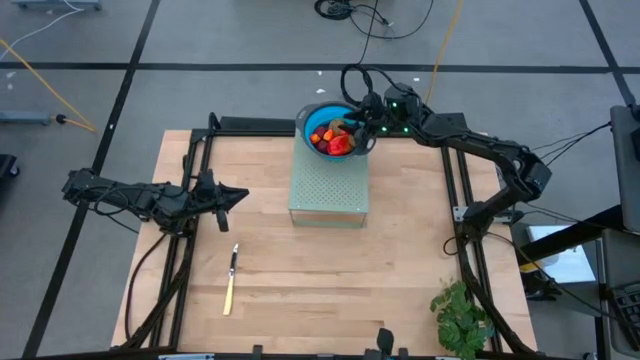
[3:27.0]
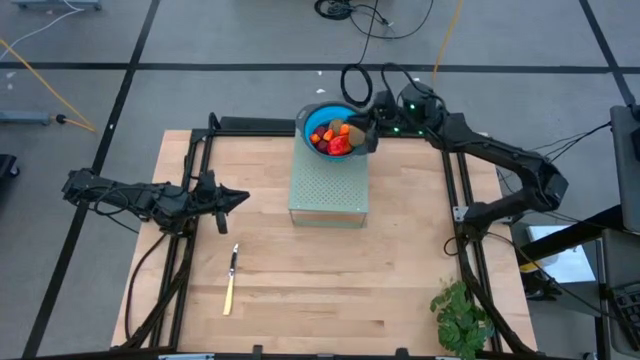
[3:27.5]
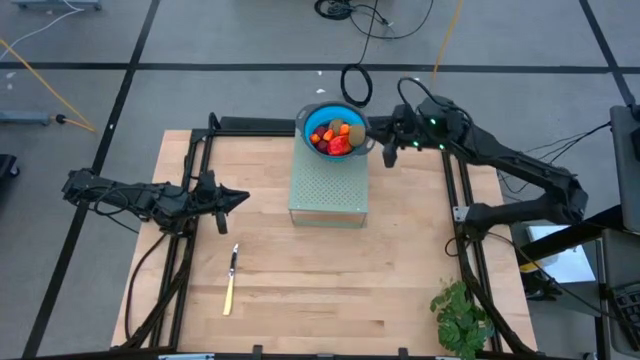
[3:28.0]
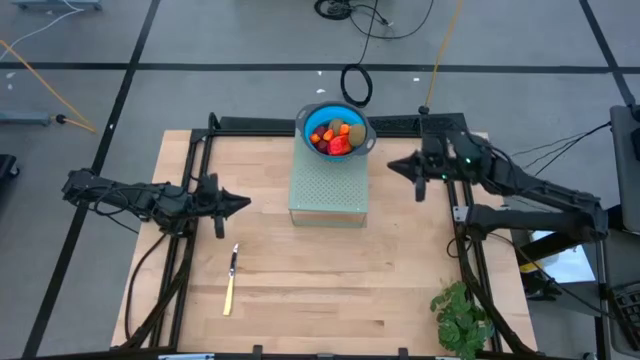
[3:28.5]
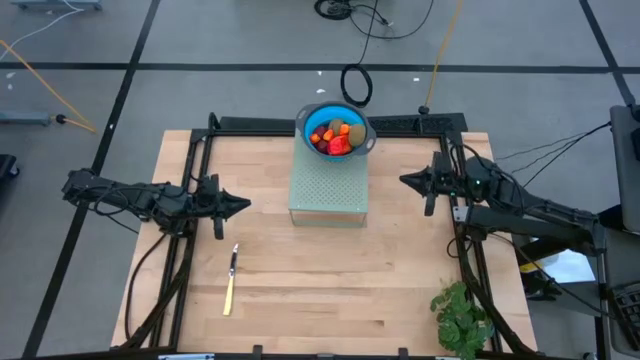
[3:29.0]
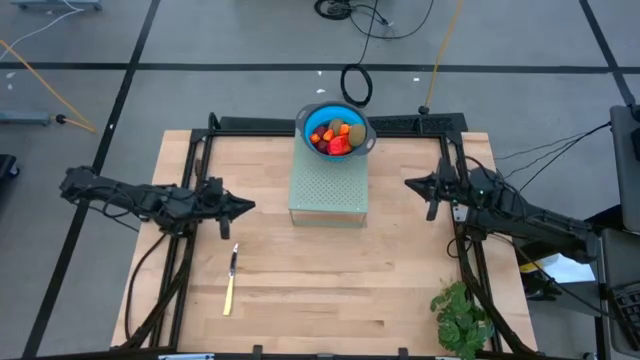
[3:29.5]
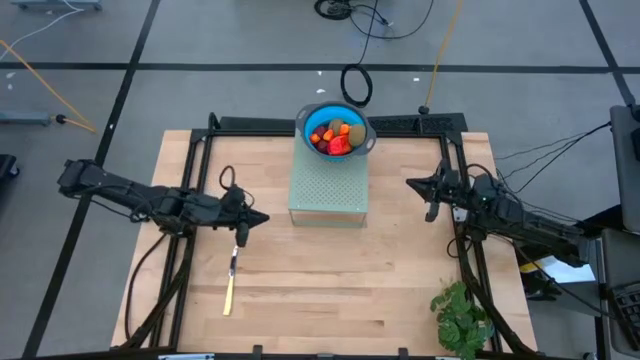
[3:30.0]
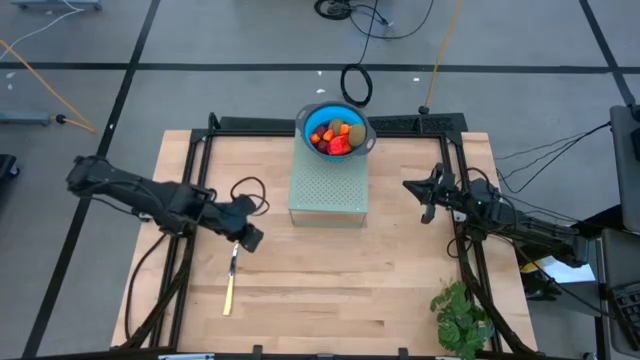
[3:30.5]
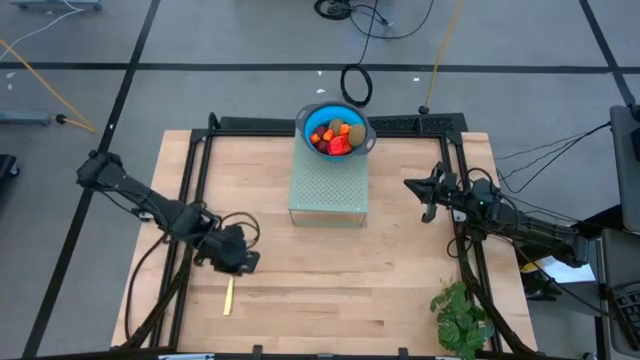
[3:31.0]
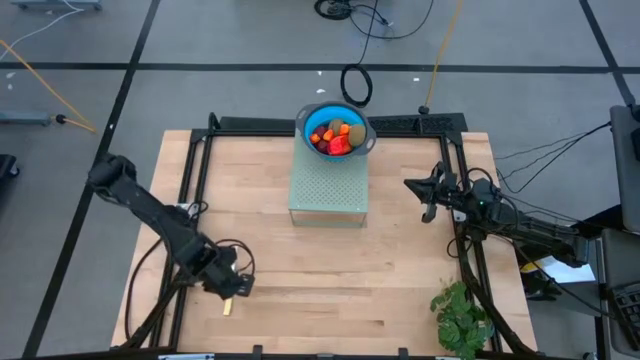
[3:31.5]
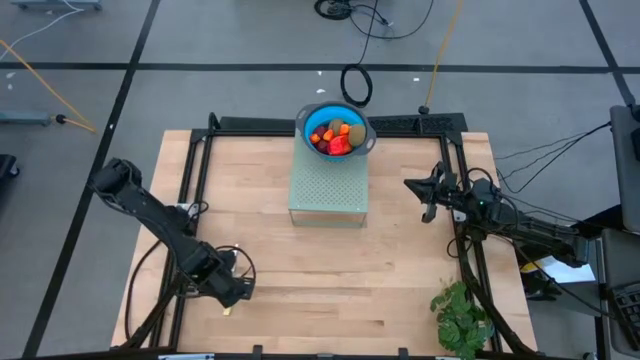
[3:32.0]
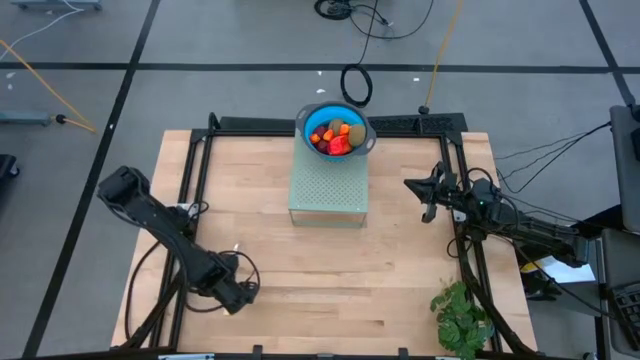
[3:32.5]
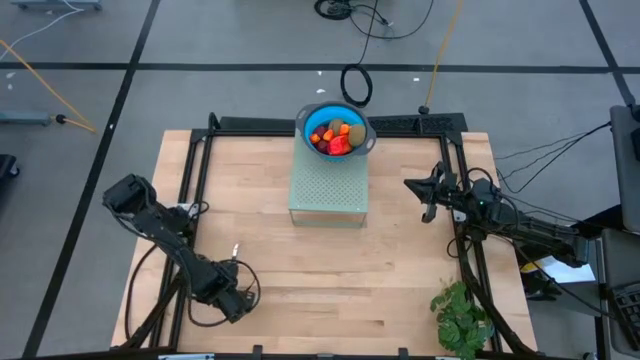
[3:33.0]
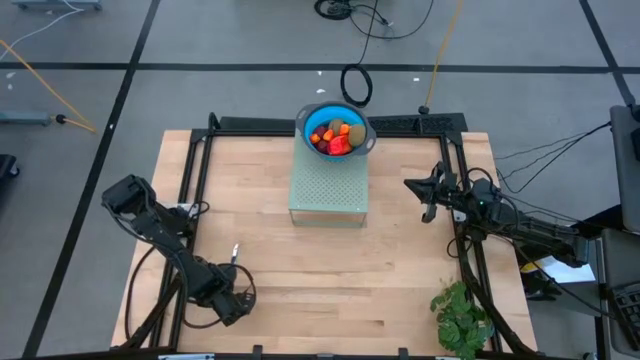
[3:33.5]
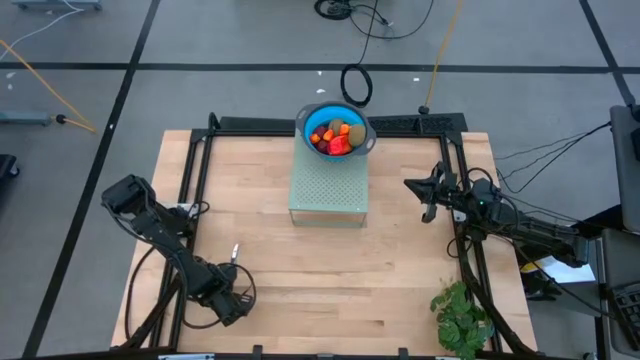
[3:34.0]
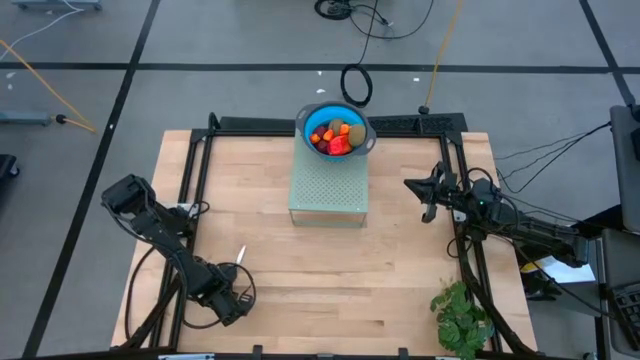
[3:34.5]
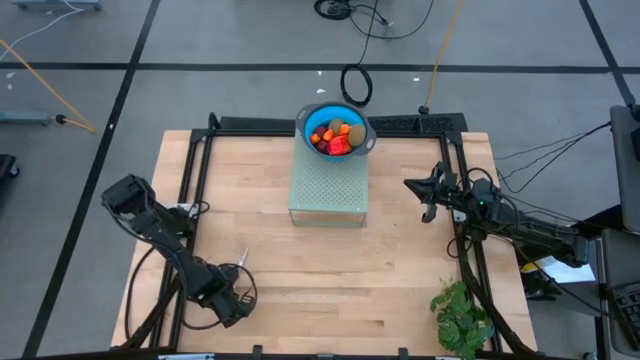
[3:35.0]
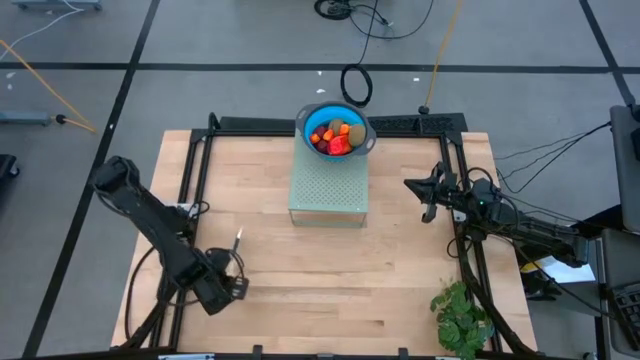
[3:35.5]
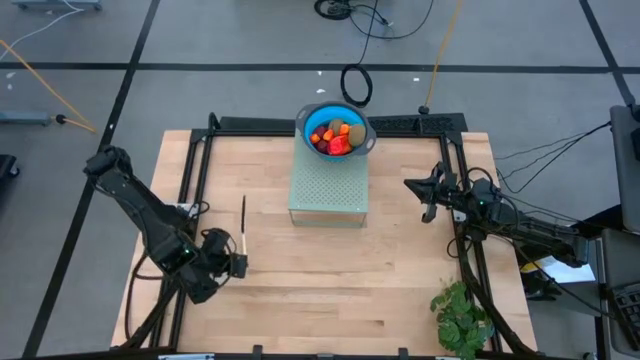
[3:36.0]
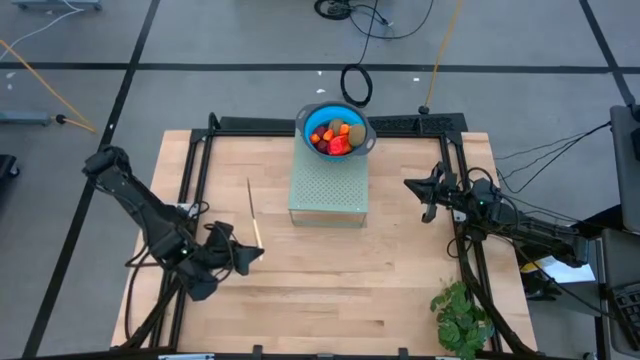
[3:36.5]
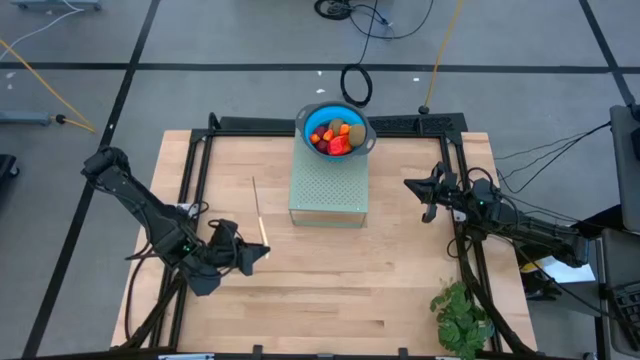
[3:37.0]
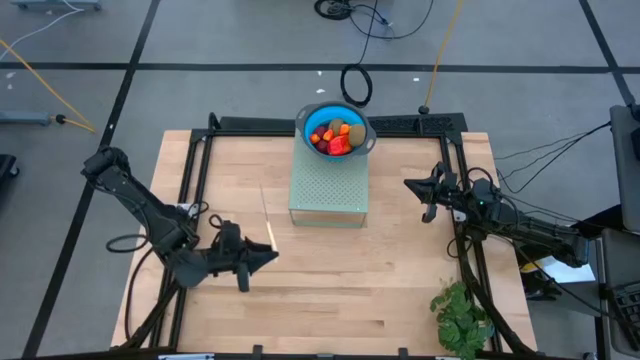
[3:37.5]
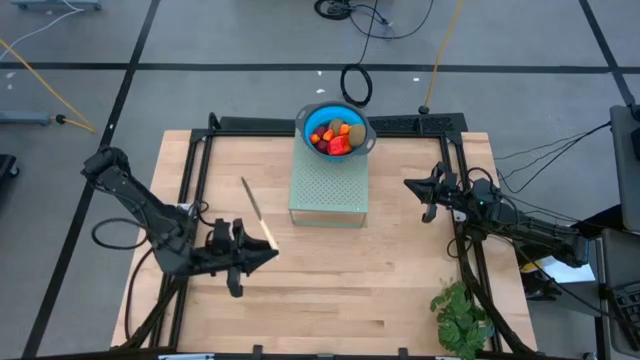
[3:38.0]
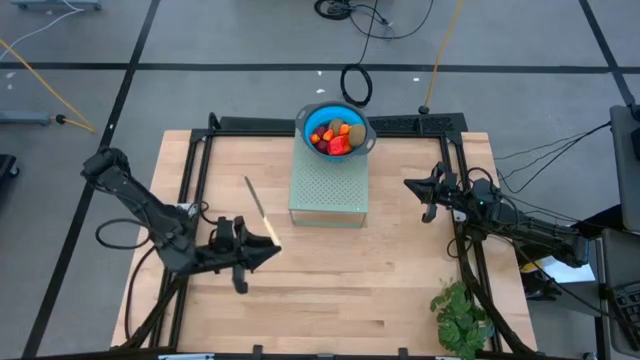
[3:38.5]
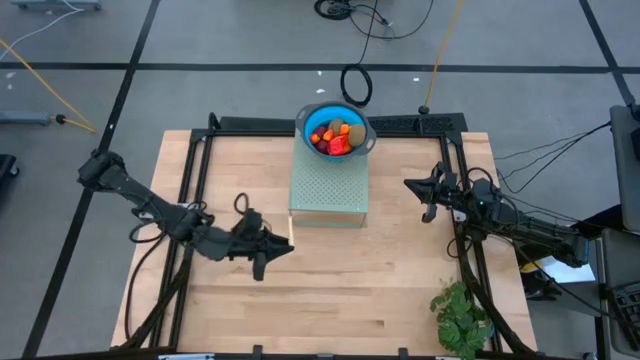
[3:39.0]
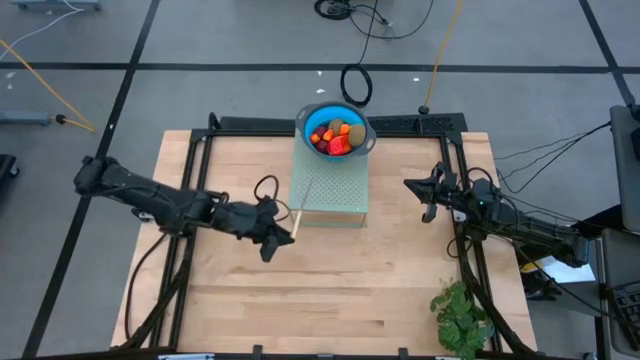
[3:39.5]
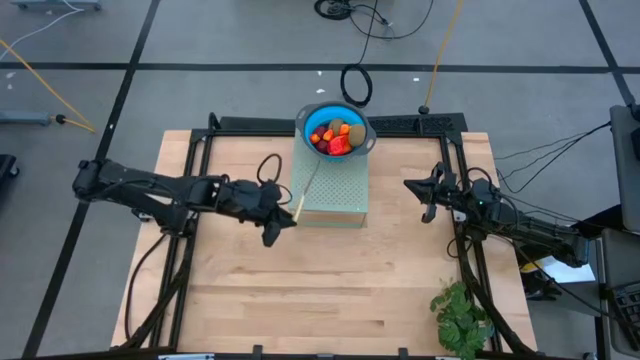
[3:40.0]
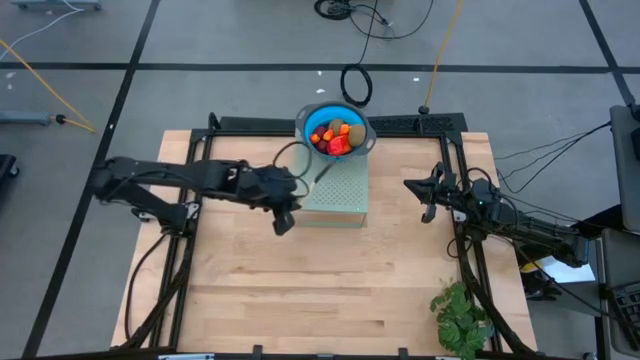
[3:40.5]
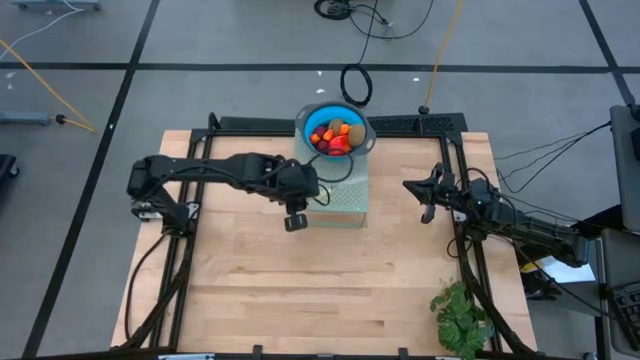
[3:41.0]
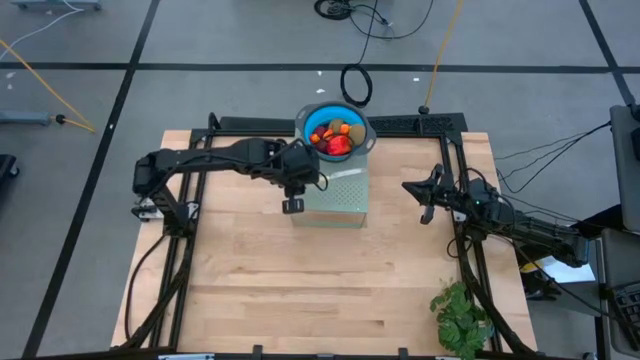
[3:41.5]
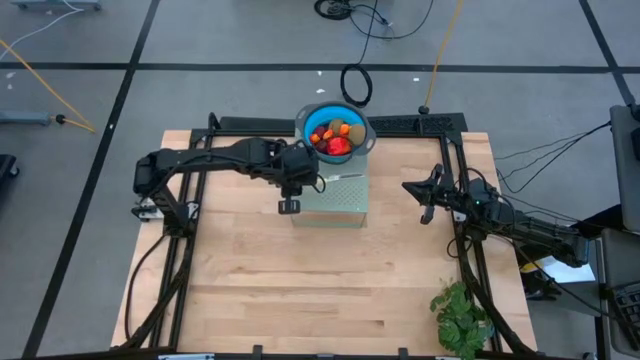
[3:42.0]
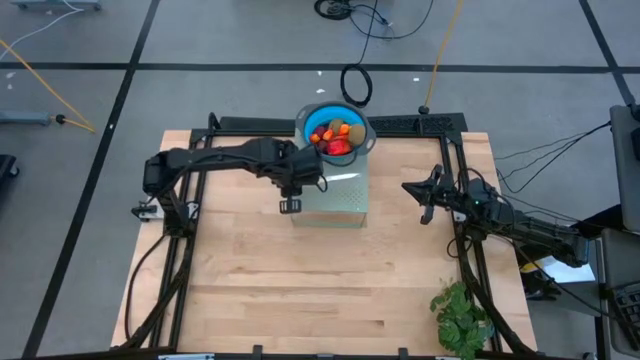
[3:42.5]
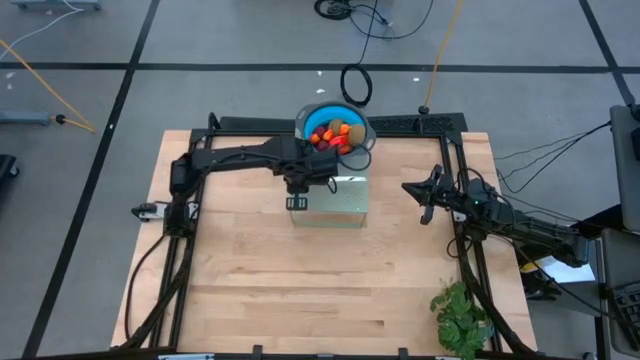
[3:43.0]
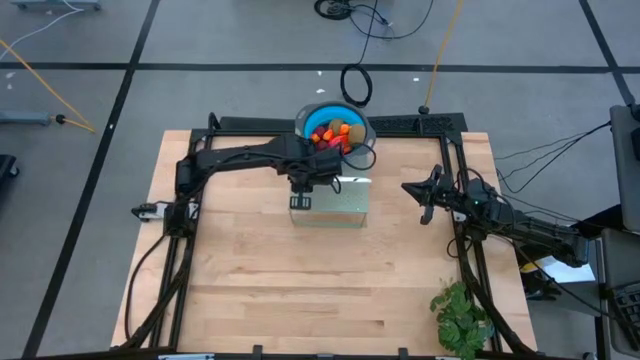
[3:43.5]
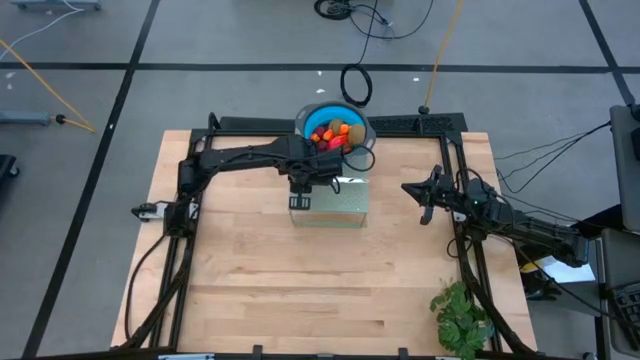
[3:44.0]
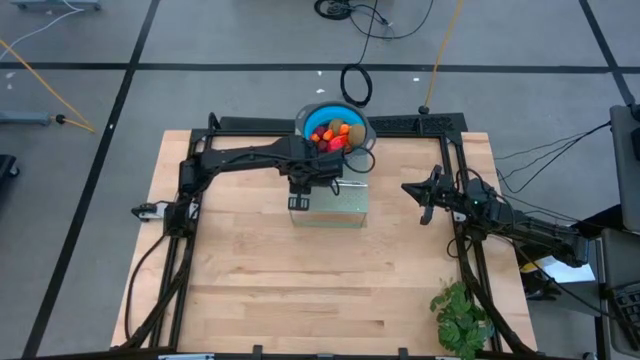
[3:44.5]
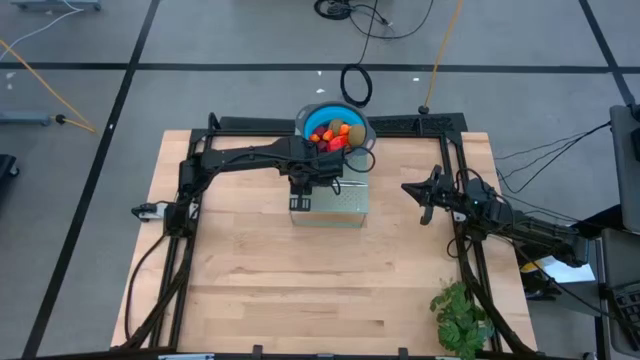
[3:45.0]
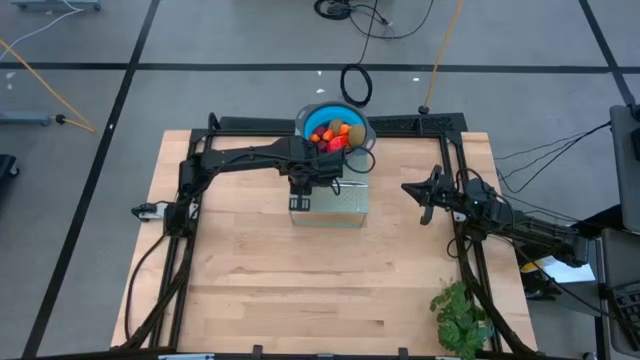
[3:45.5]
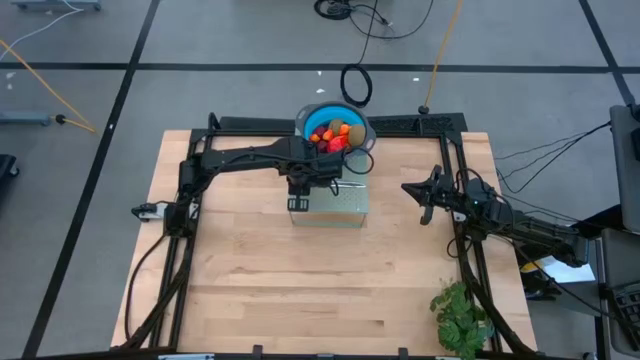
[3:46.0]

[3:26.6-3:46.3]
Task: Pick & Place Fruit
Put the yellow knife on the shelf

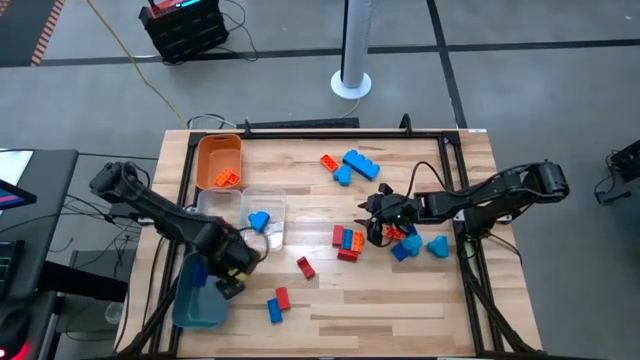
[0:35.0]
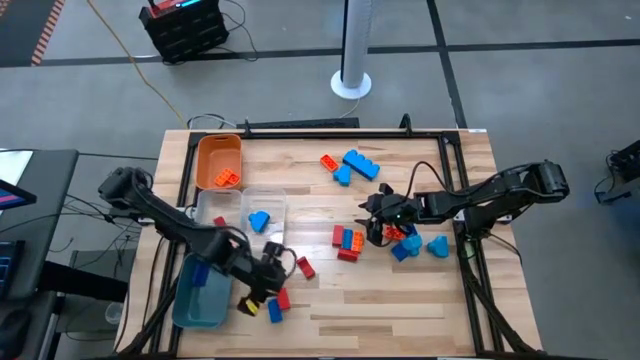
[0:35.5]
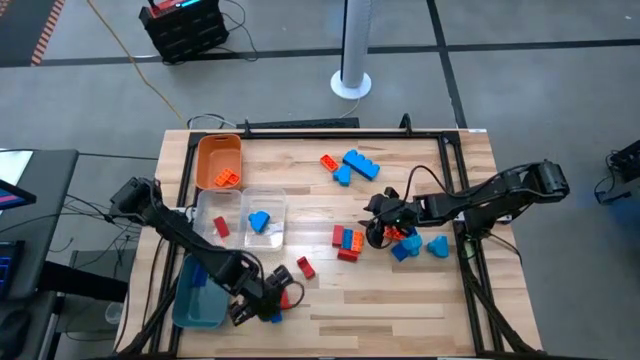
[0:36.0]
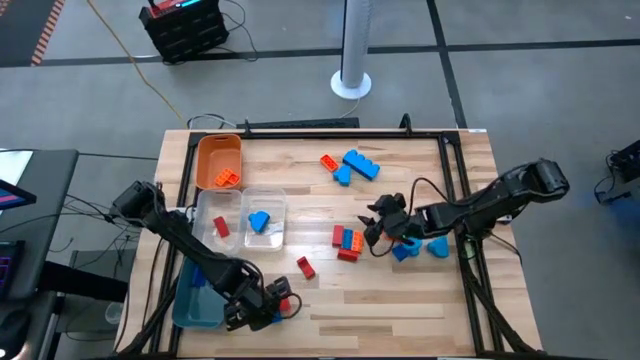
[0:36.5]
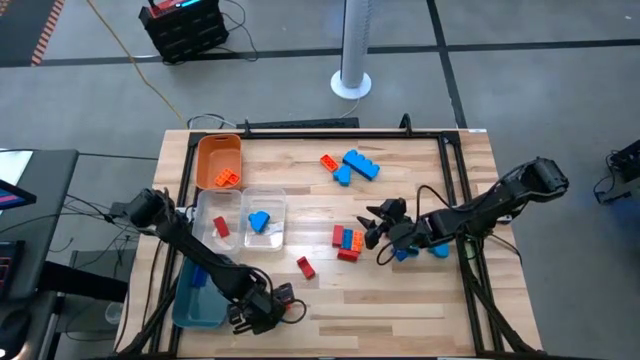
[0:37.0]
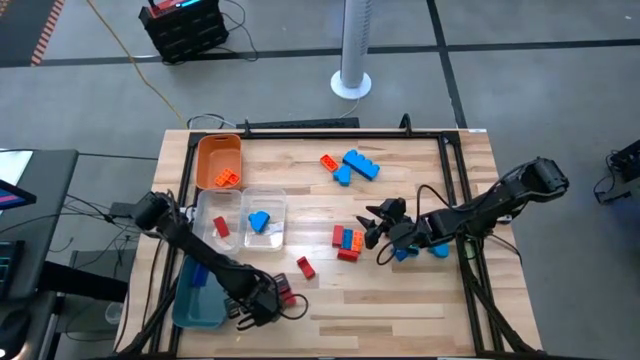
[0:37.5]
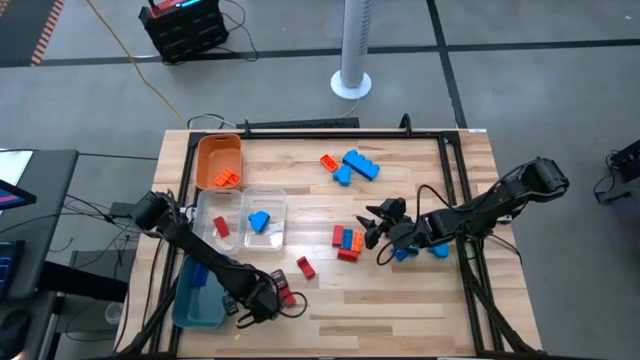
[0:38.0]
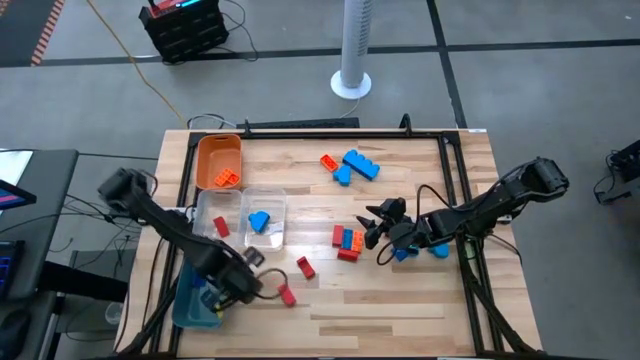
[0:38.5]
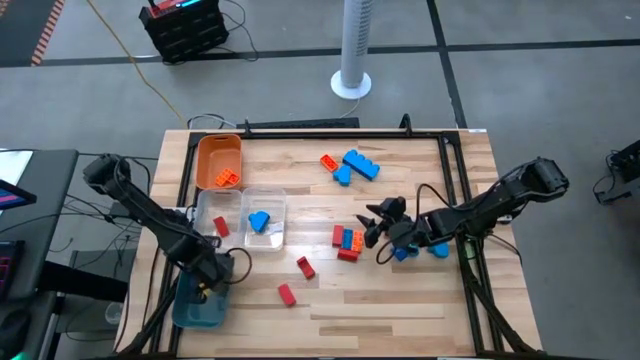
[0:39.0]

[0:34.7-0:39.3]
Task: Sort blocks
Put the blue game piece into the blue bin
